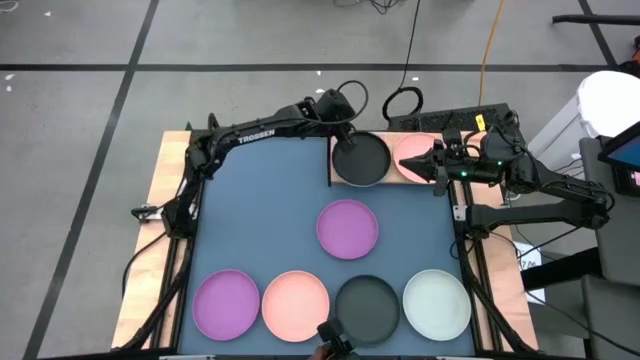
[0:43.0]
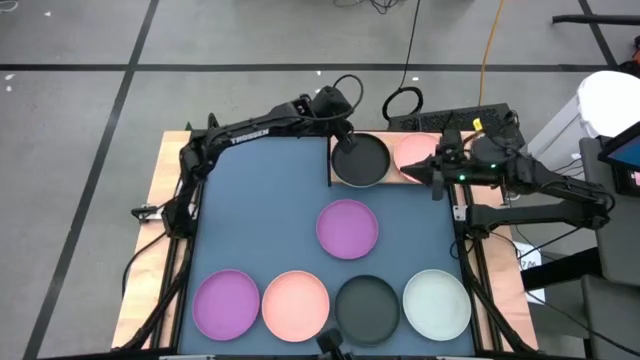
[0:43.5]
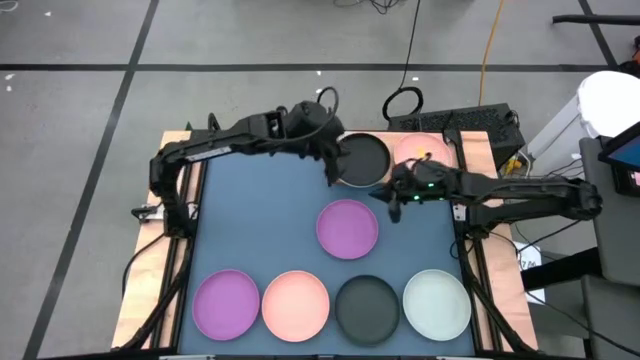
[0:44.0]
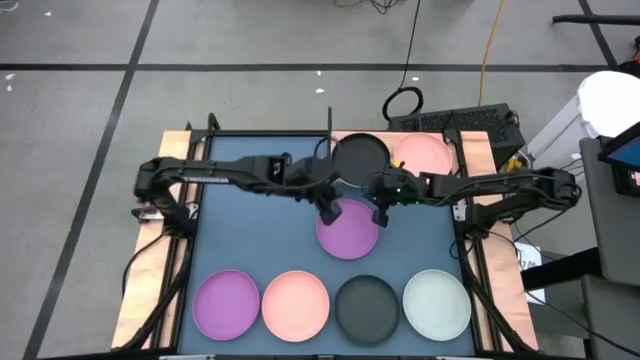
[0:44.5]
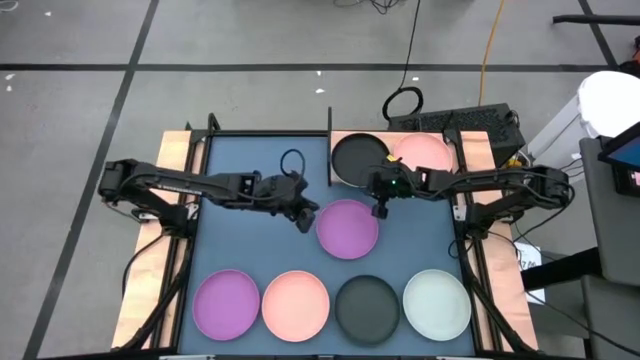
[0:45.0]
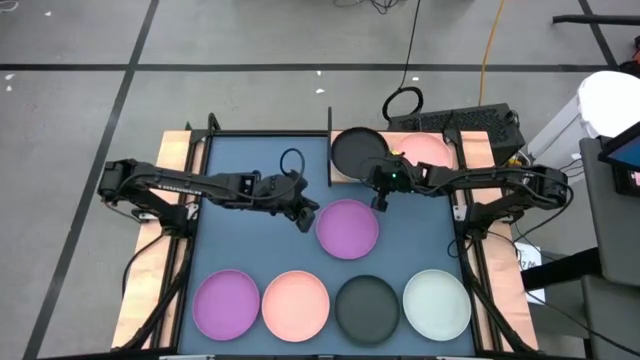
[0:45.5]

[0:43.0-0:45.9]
Task: Place and stack plates onto a shelf
Adjust the stacked plates on the shelf

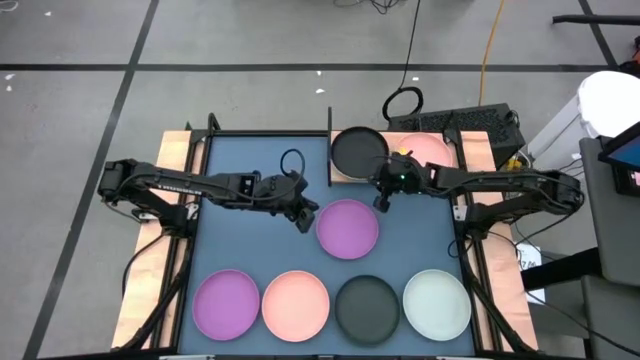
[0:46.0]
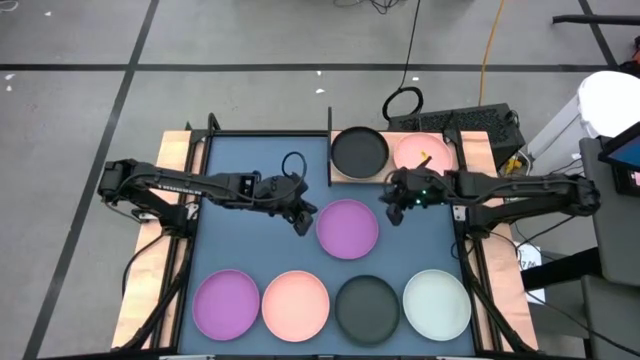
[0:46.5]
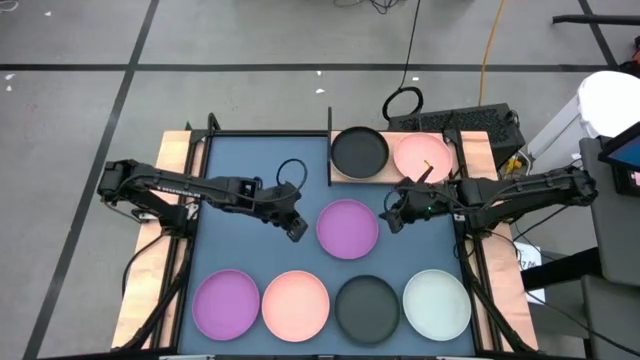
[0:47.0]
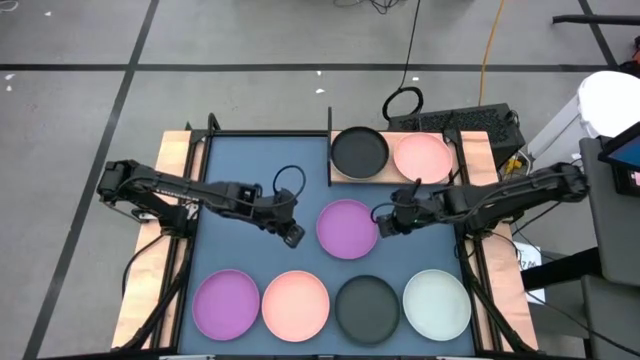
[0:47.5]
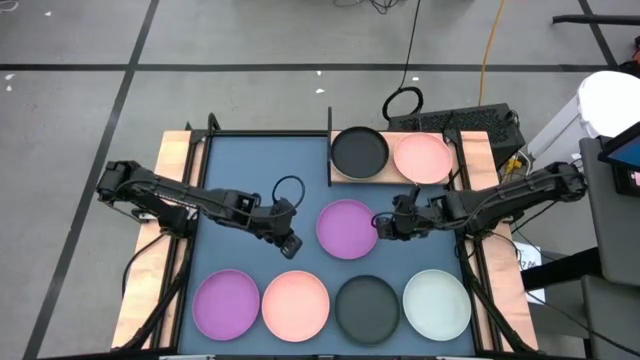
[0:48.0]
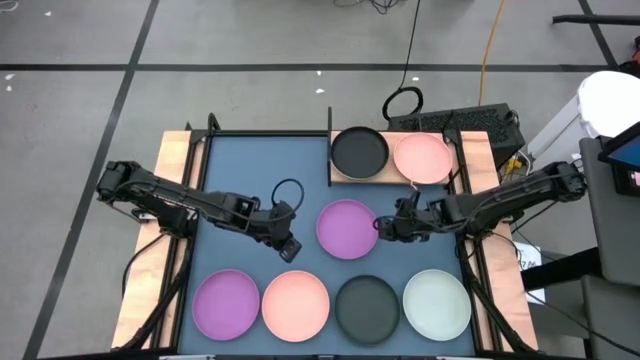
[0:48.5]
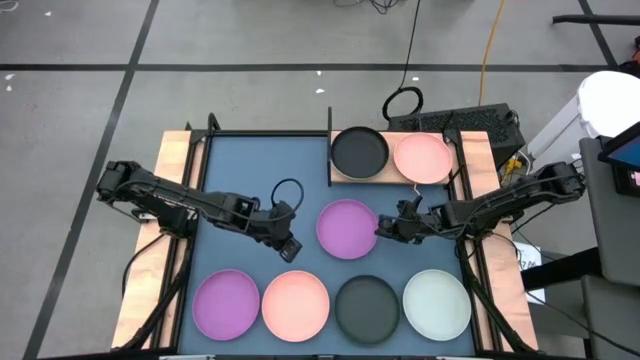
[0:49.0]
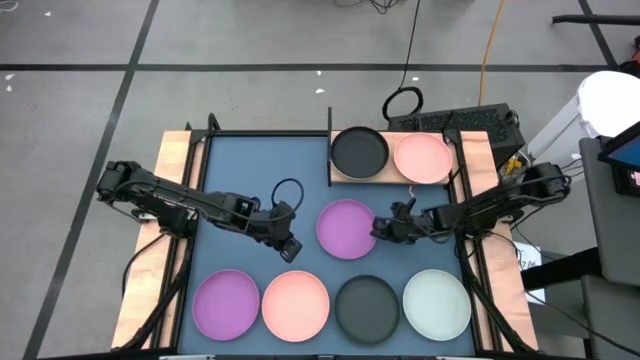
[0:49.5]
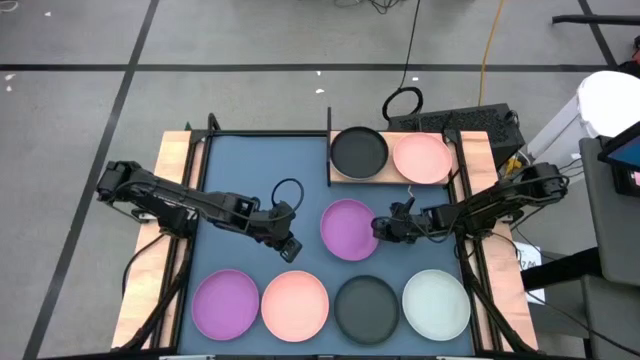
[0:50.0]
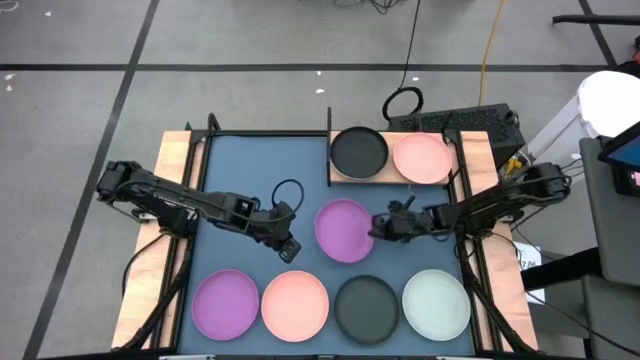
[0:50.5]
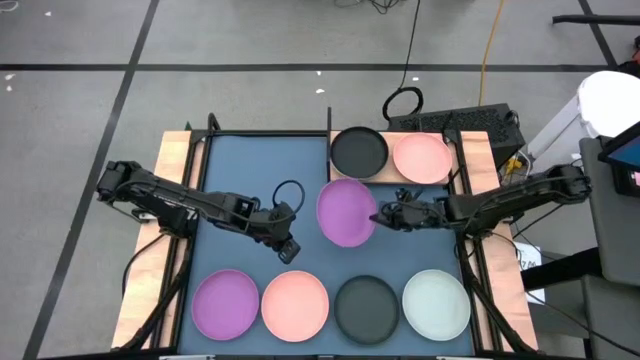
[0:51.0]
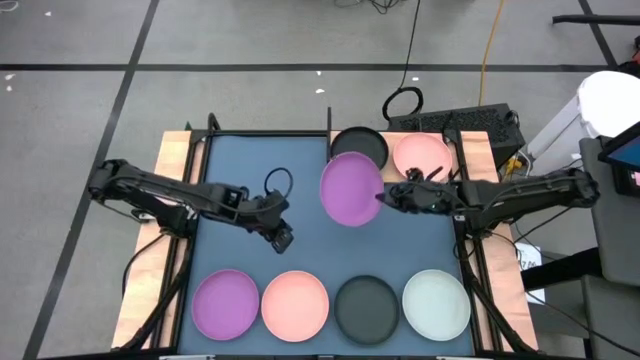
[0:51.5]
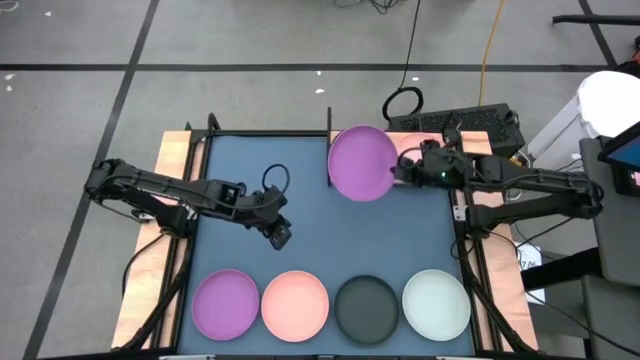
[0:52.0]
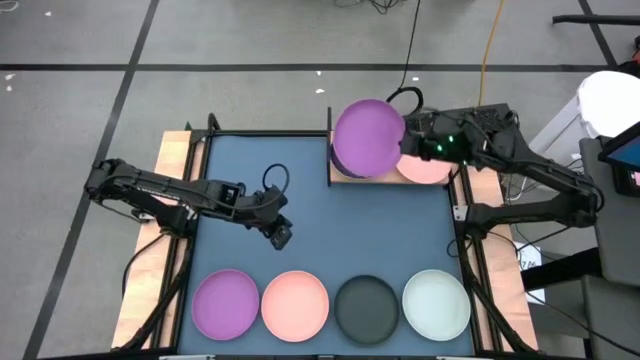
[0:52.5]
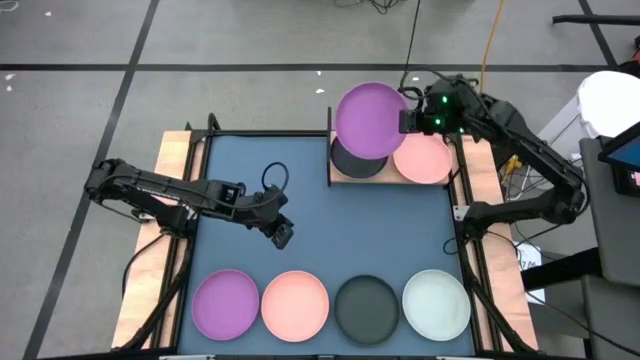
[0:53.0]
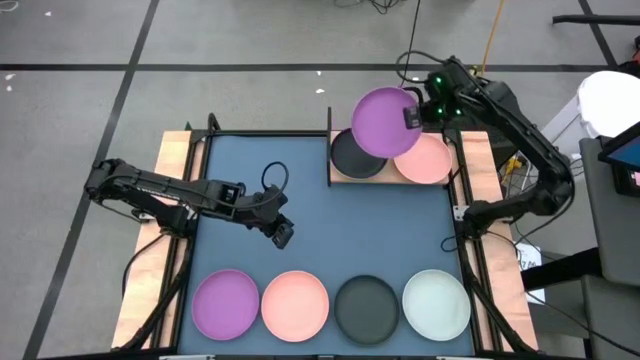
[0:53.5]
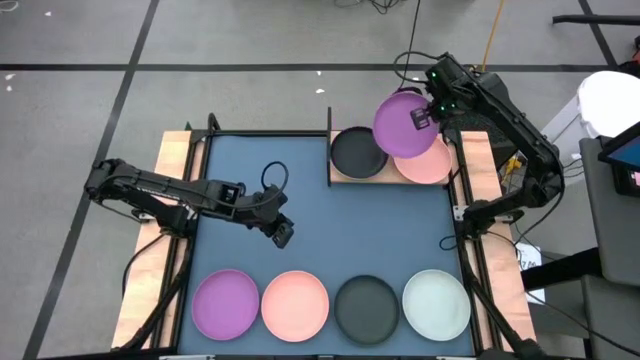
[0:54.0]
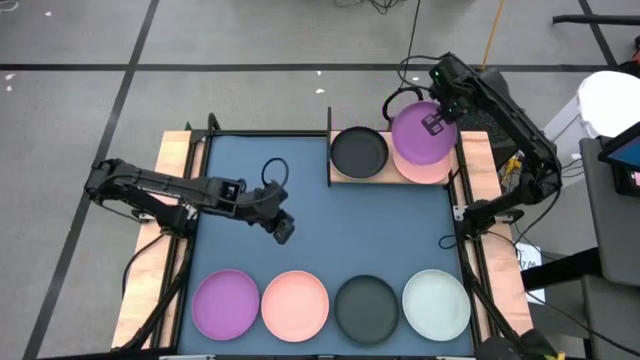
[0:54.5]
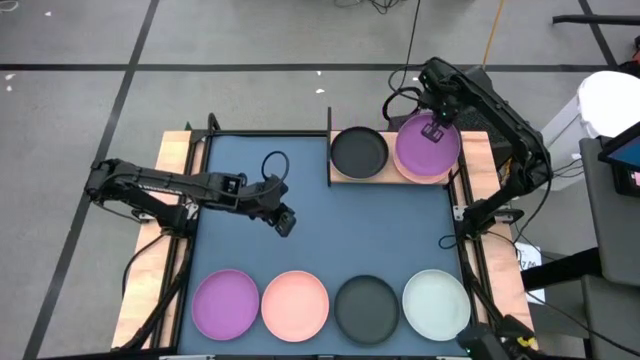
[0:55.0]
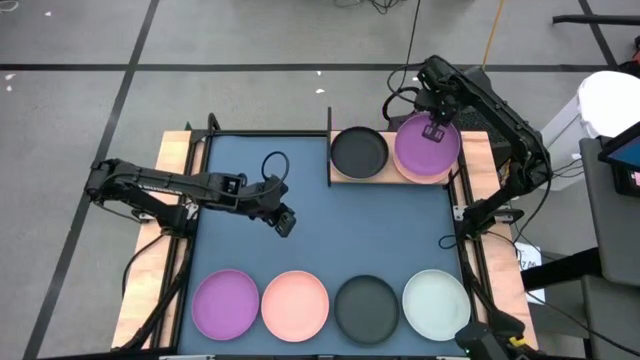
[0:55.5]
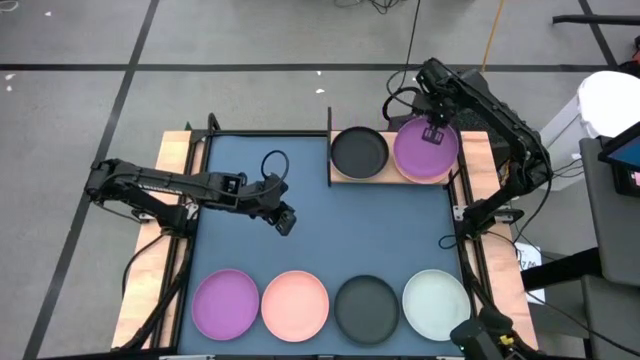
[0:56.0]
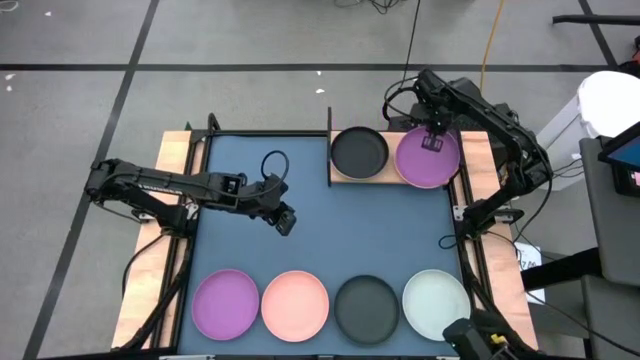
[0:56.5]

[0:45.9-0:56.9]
Stack the top purple plate on top of the orange plate on the shelf

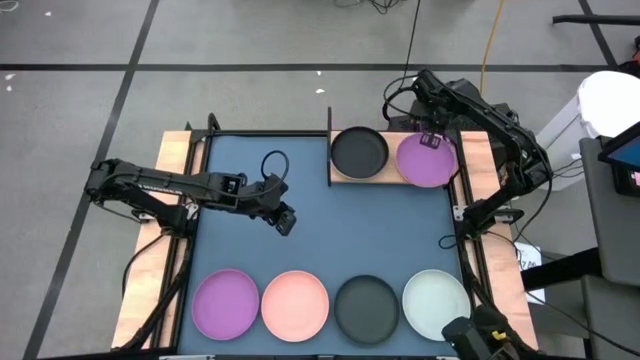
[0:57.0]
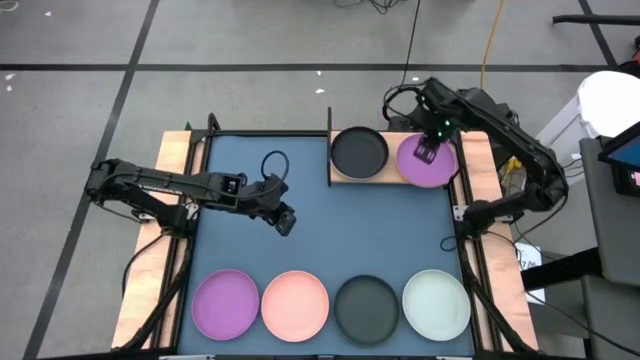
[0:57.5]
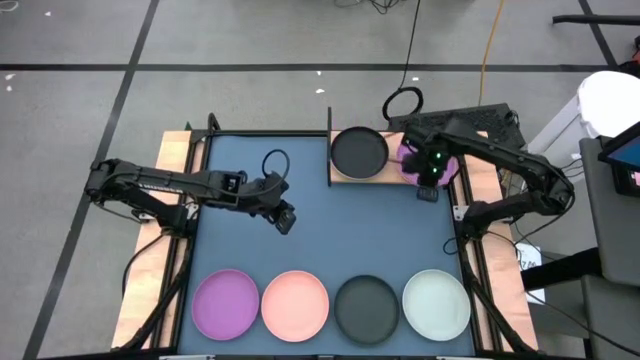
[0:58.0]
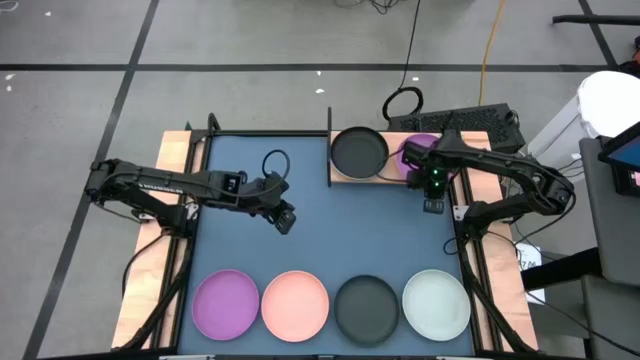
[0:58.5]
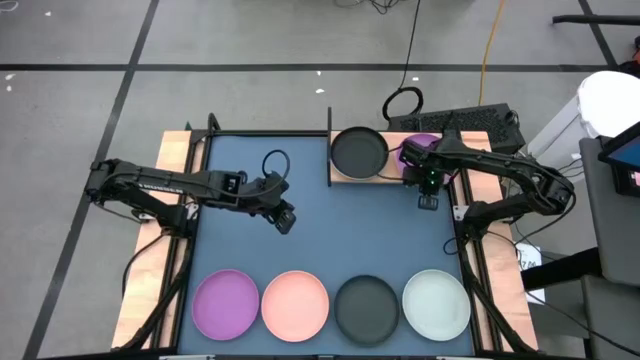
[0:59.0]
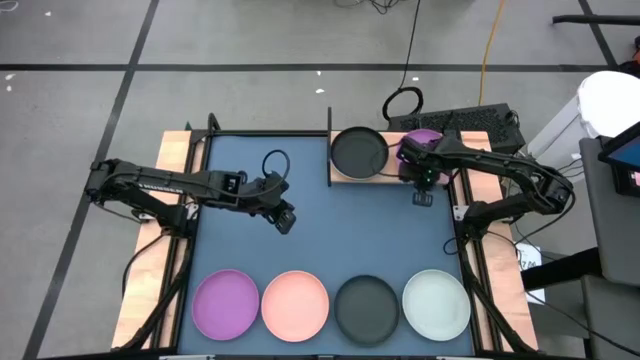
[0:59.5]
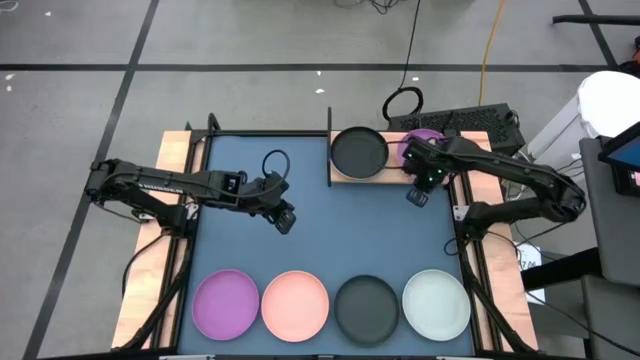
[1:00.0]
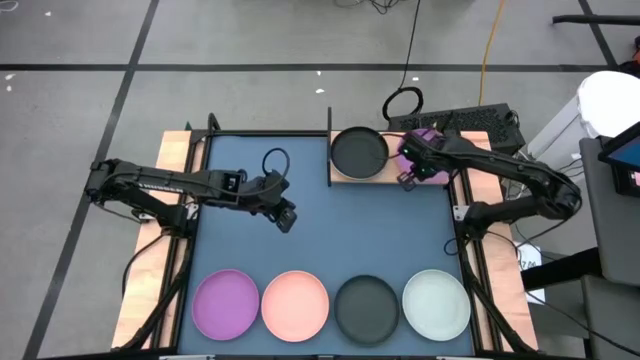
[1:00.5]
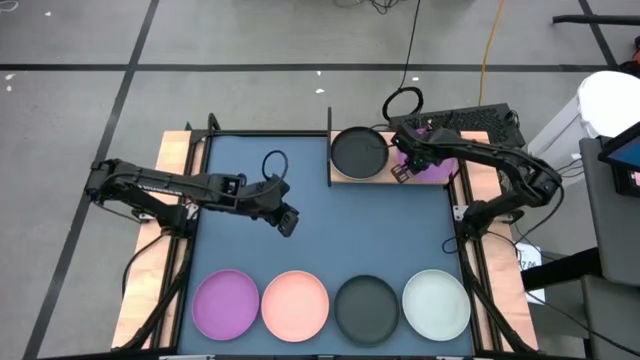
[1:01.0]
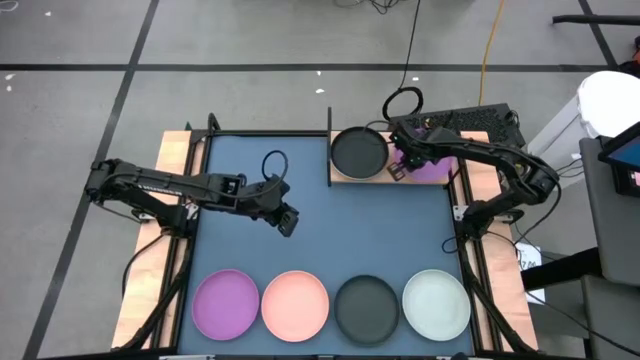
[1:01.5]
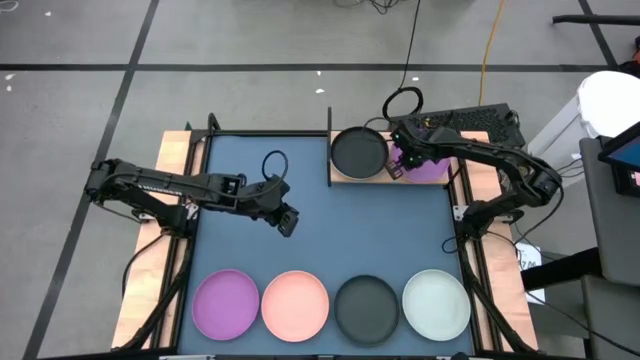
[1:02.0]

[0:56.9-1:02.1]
Adjust the stacked plates on the shelf

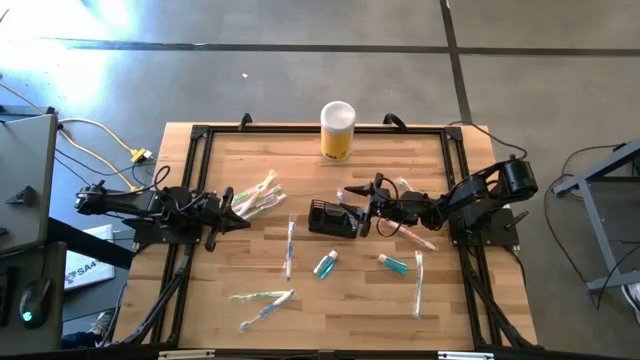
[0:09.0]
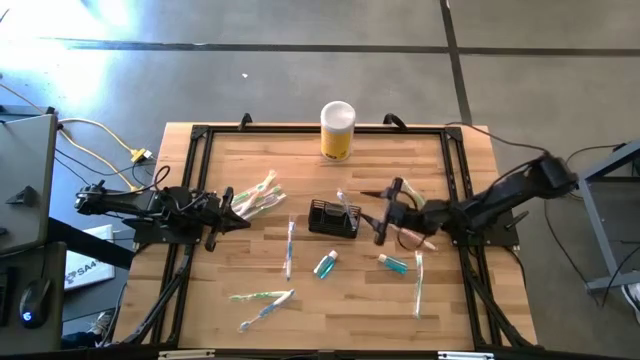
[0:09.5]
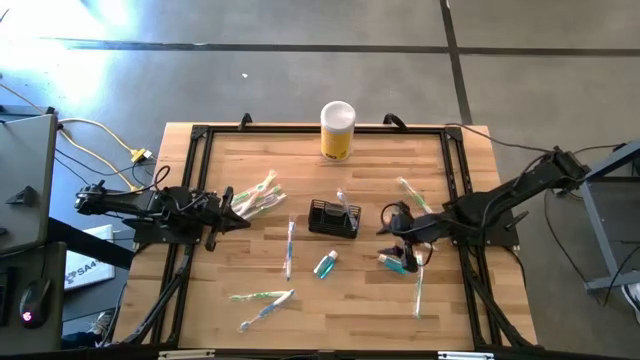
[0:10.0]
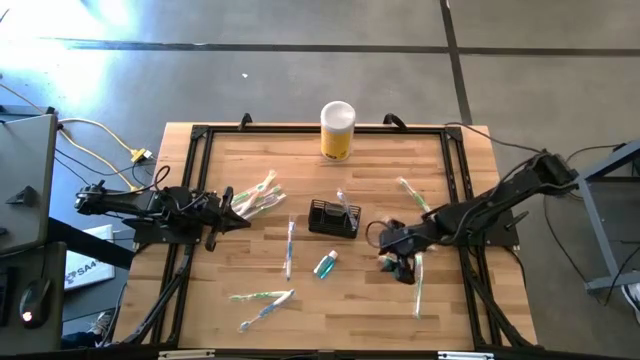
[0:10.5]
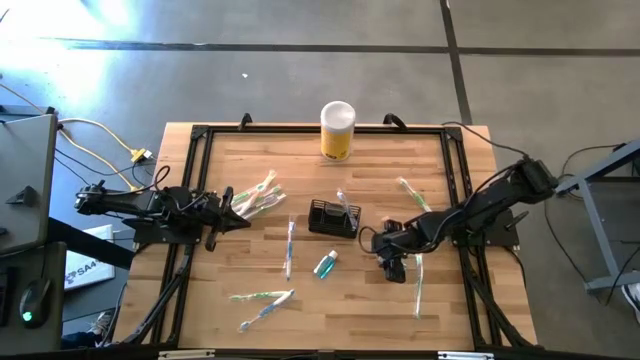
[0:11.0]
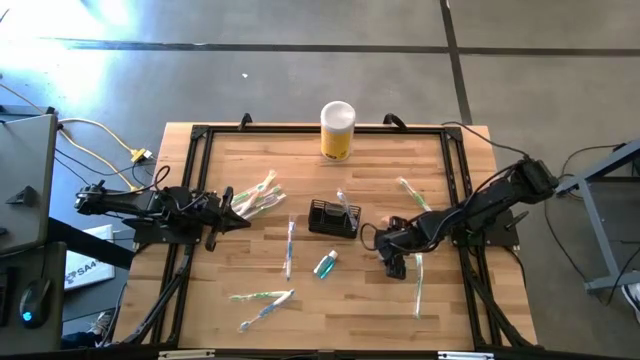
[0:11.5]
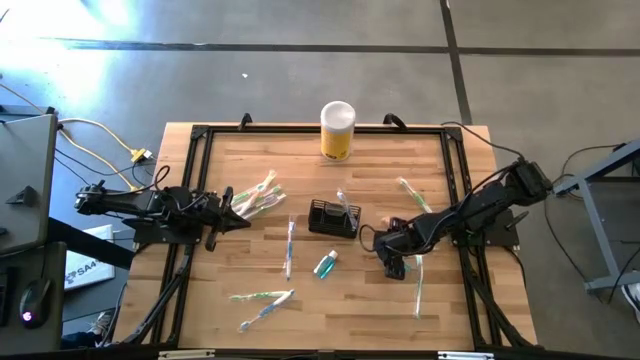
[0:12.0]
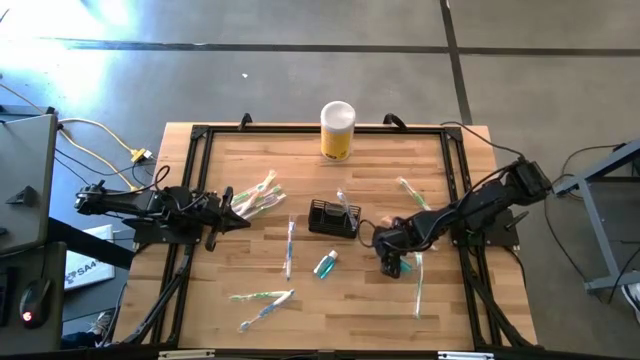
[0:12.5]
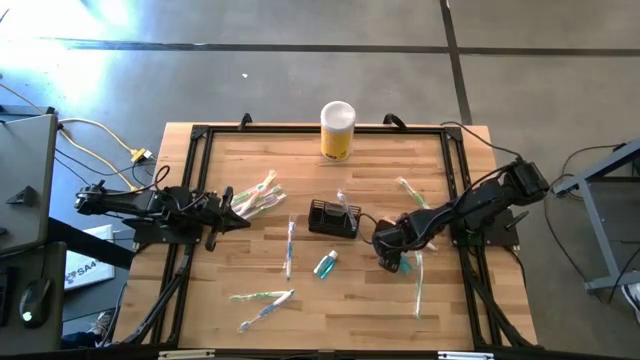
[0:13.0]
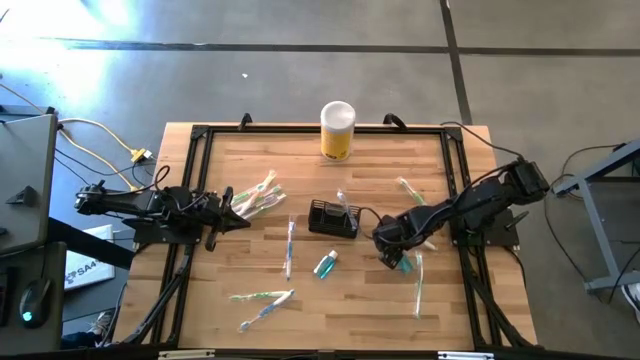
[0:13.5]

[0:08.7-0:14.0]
Task: Pick & Place toothbrushing station
Put the right mouthwash into the wire organizer
